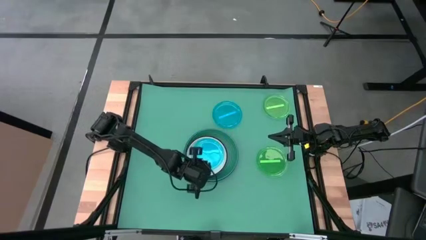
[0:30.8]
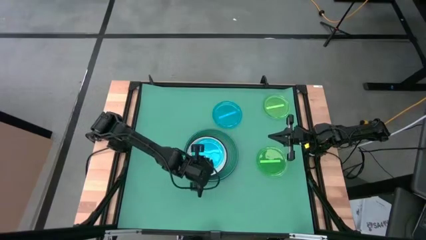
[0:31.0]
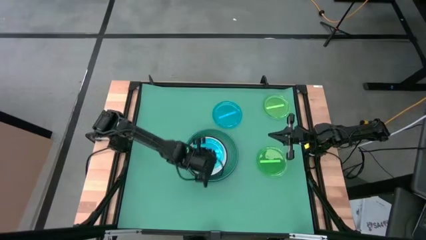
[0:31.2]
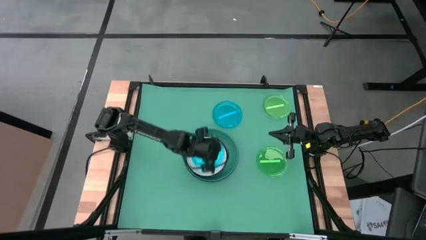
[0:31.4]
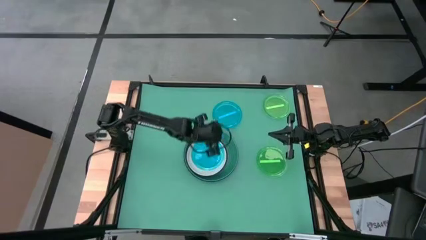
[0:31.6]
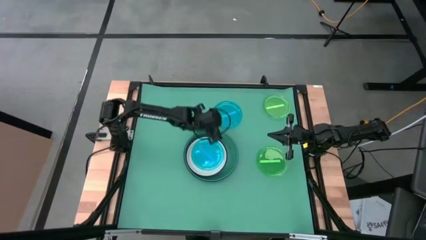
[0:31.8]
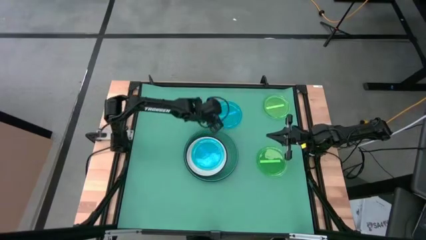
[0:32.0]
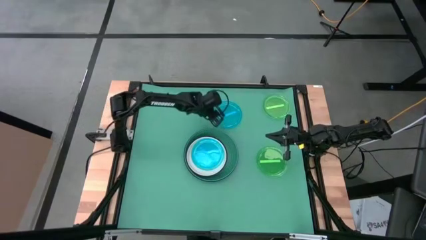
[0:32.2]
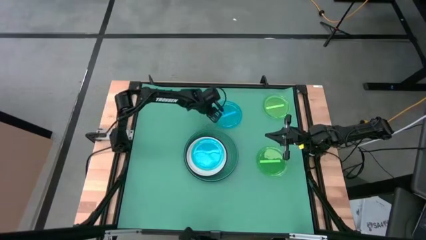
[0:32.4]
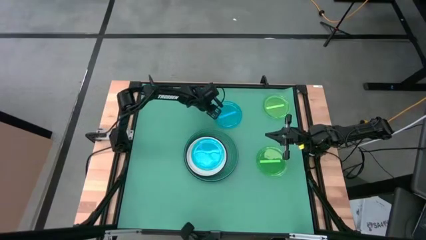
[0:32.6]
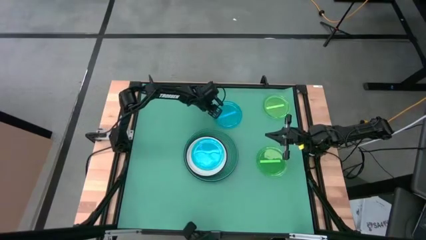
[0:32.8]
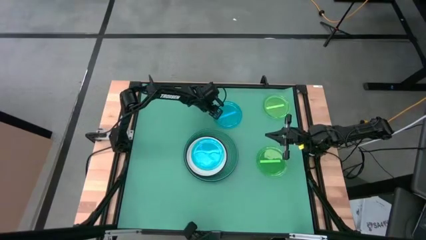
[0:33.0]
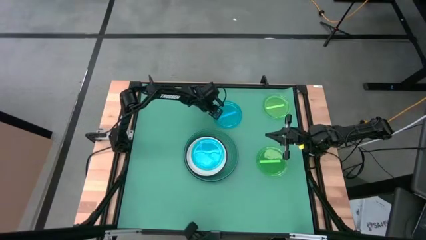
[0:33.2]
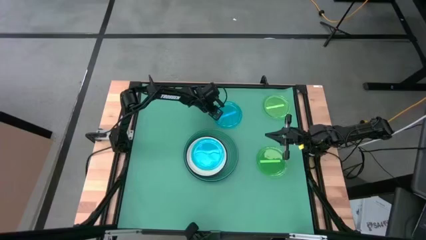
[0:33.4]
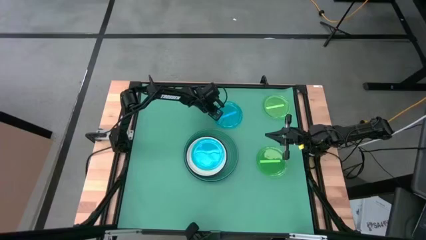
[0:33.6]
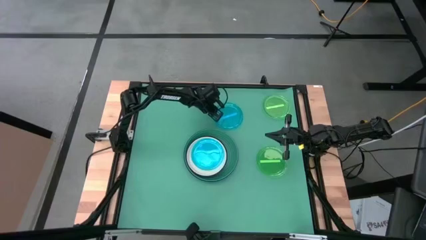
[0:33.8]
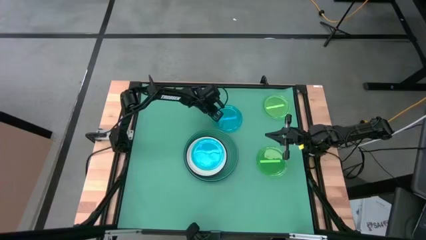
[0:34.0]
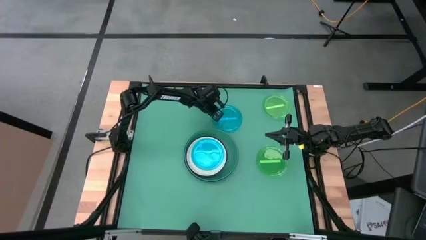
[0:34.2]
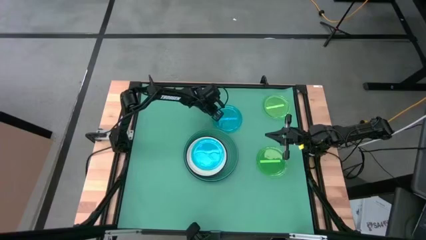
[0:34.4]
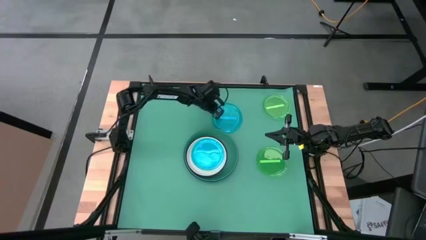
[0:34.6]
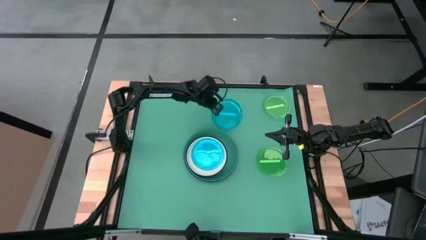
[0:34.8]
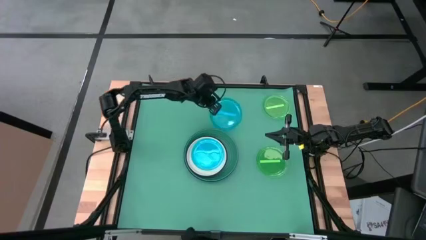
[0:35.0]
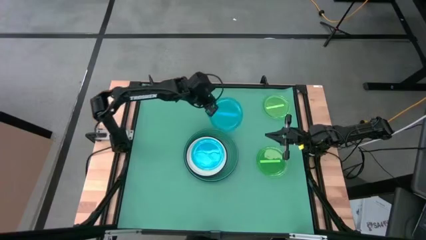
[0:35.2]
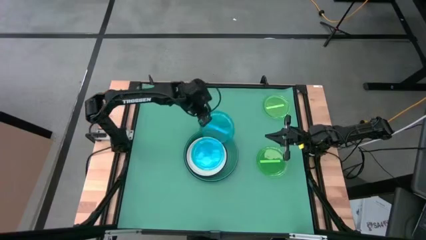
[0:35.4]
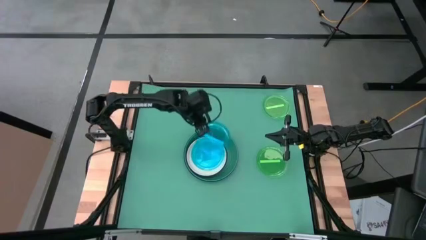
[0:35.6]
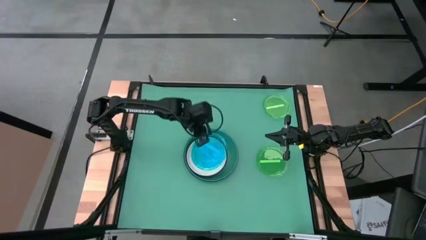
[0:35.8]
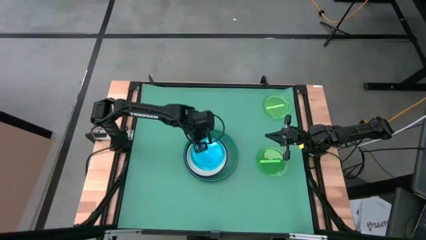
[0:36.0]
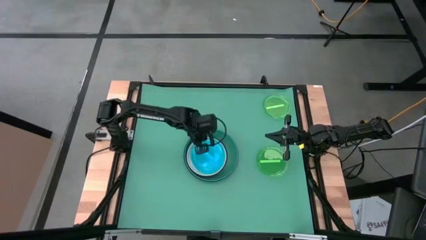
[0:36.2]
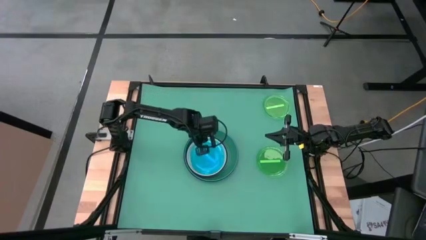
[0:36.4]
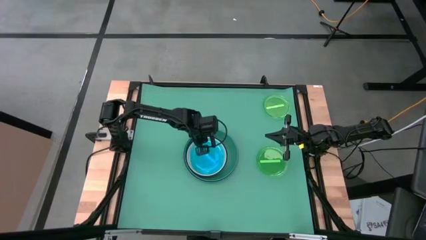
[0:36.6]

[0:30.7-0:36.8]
Task: Stack plastic plates
Stack the plastic blue plate on the plastic blue plate

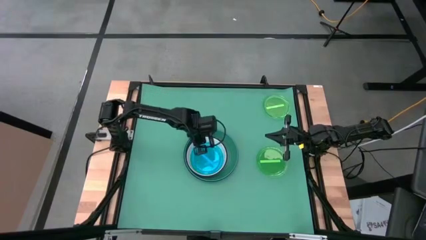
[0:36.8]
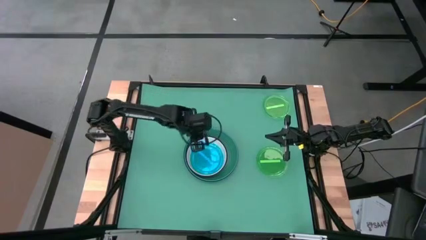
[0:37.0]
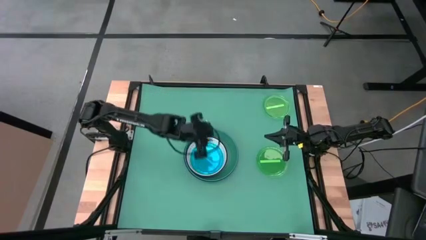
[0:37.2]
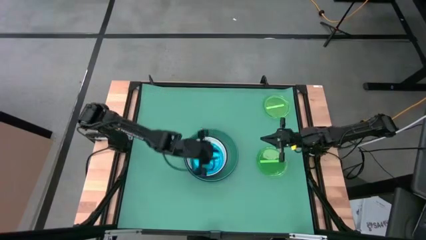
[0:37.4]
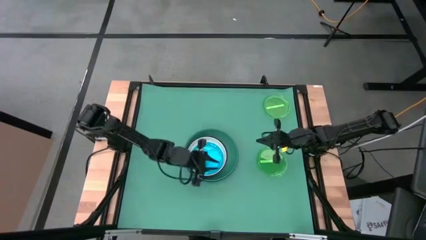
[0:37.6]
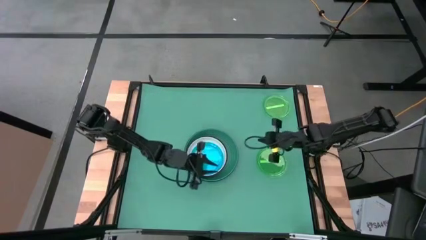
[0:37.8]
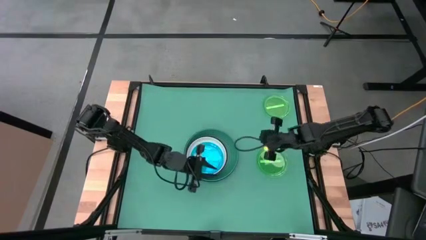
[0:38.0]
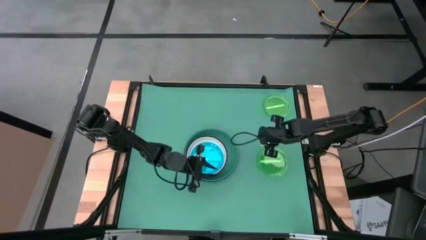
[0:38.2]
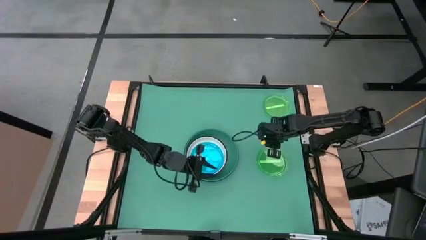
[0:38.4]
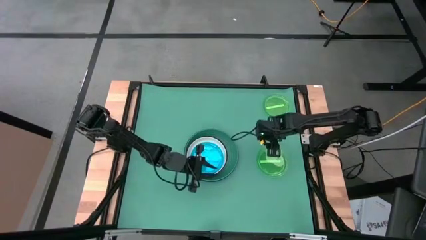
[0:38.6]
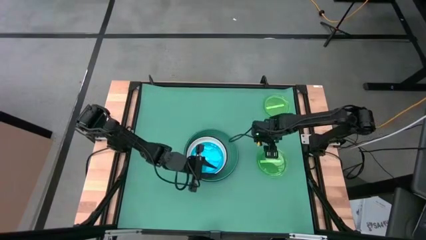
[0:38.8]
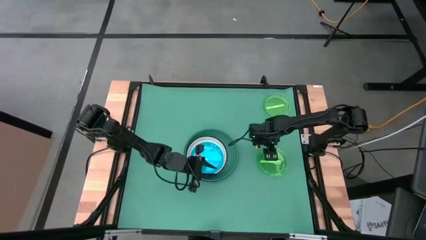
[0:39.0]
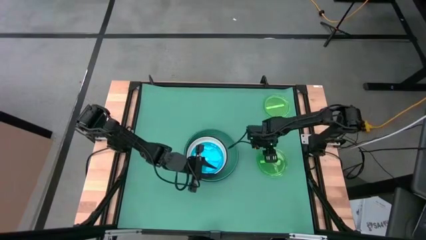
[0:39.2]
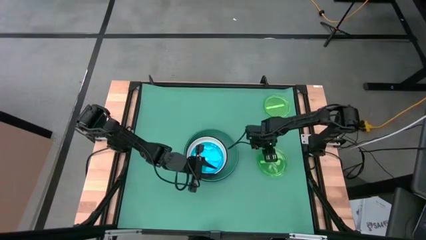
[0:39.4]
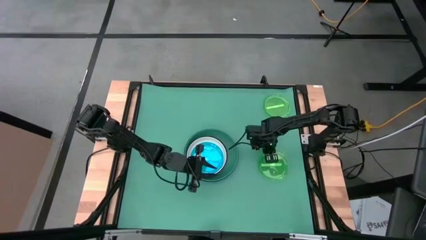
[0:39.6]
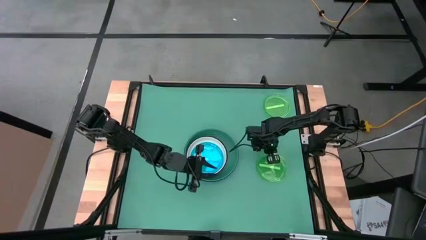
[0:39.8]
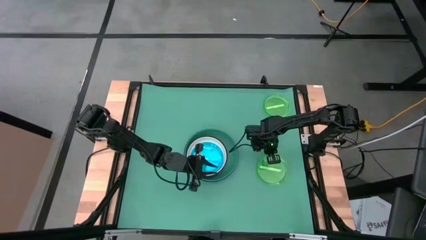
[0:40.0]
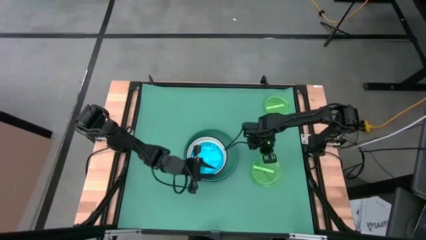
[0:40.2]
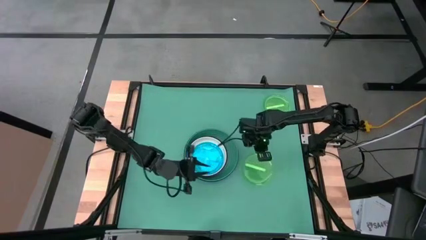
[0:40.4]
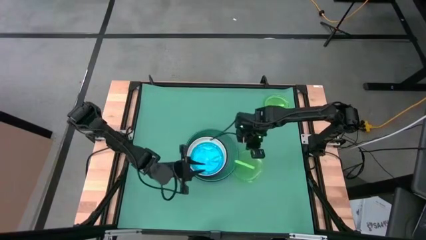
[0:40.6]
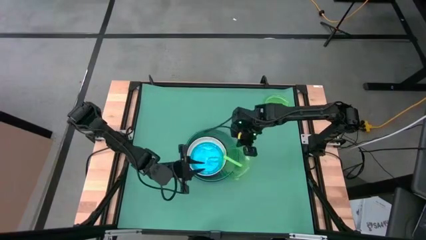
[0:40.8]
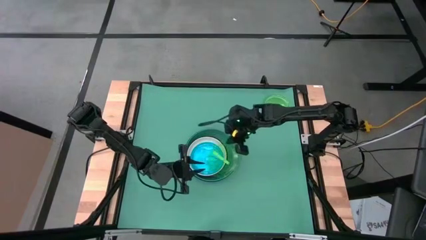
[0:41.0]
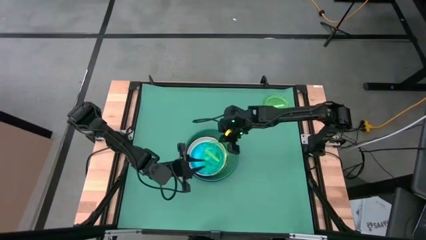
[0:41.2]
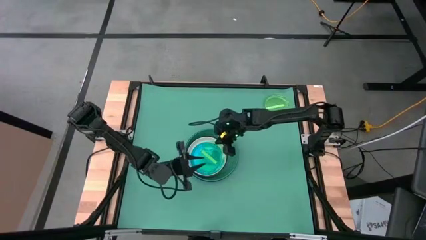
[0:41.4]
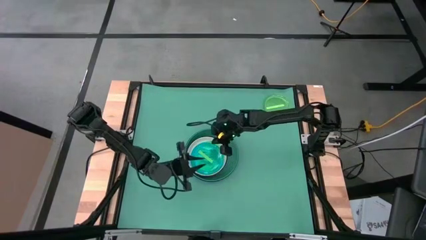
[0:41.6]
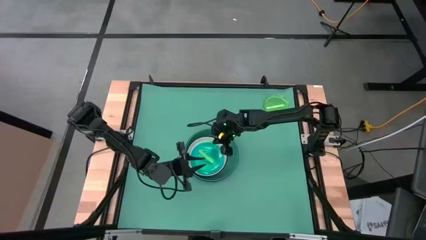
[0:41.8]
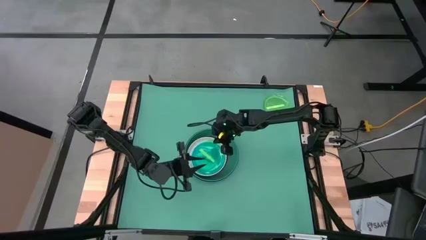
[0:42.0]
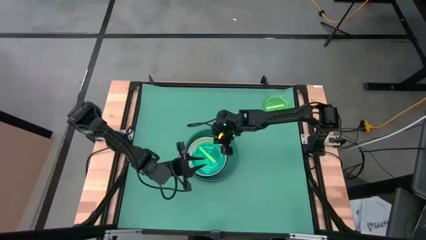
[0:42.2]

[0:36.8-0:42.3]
Stack the bottom plastic green plate on the plastic blue plate

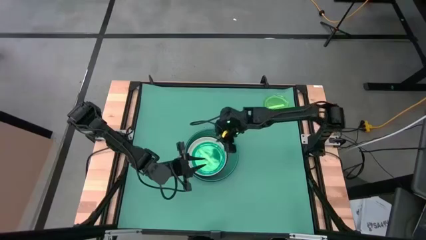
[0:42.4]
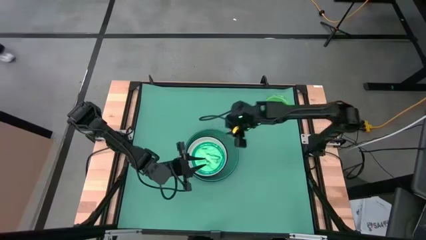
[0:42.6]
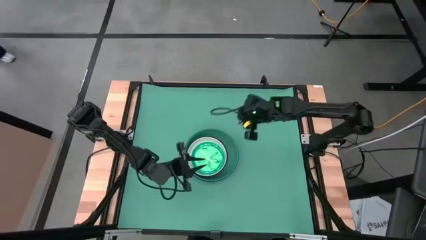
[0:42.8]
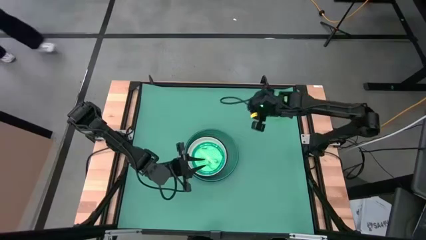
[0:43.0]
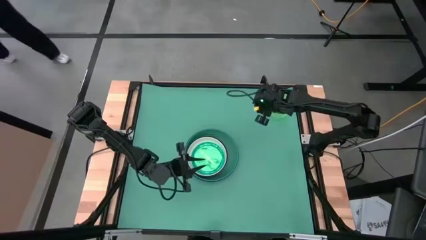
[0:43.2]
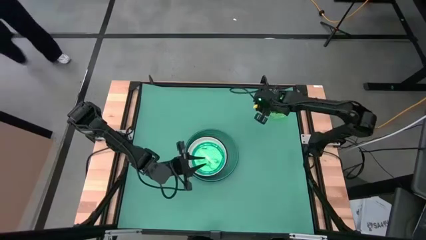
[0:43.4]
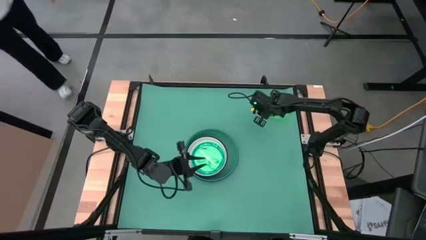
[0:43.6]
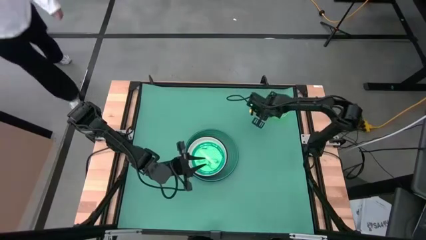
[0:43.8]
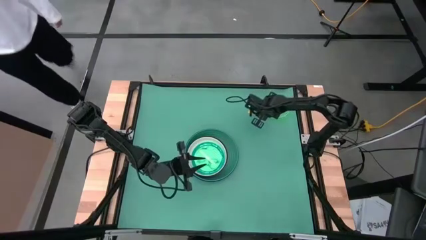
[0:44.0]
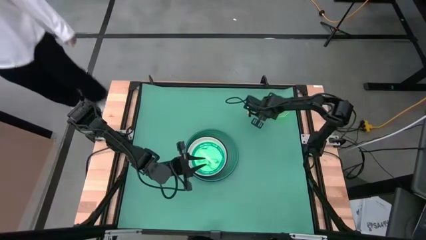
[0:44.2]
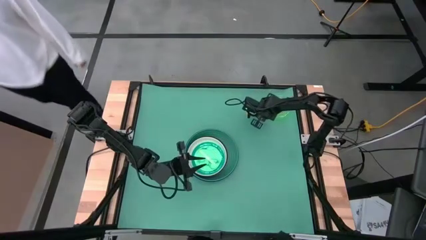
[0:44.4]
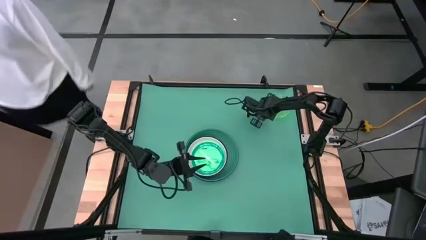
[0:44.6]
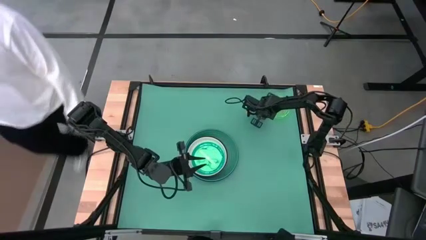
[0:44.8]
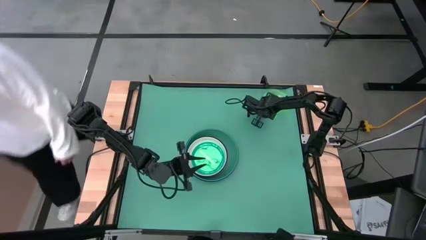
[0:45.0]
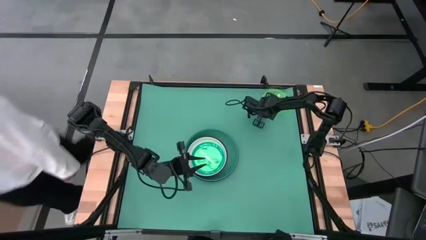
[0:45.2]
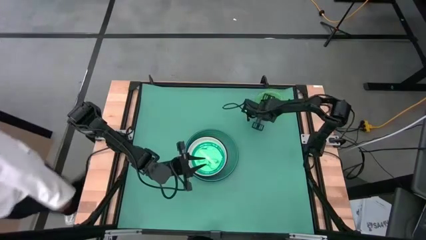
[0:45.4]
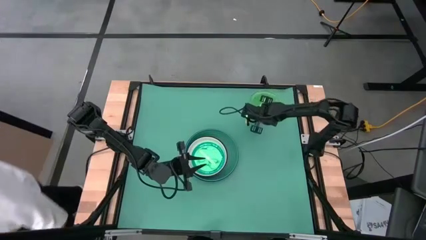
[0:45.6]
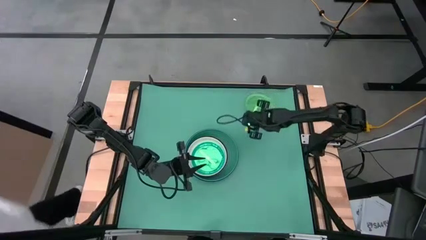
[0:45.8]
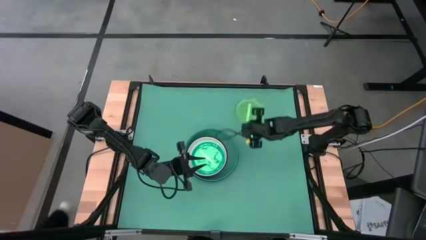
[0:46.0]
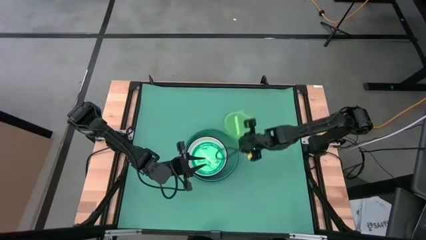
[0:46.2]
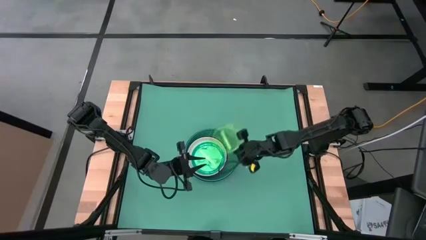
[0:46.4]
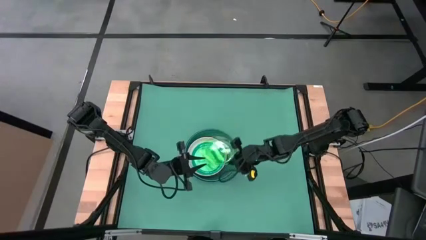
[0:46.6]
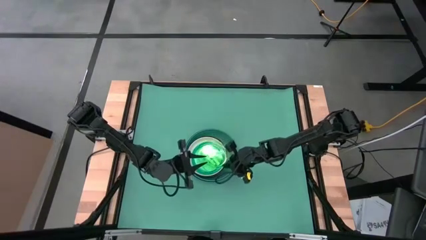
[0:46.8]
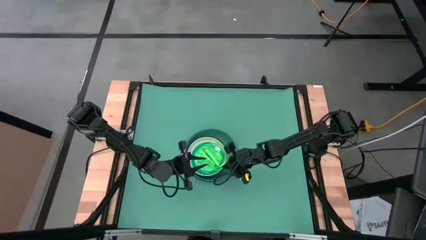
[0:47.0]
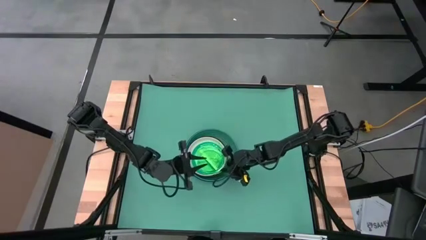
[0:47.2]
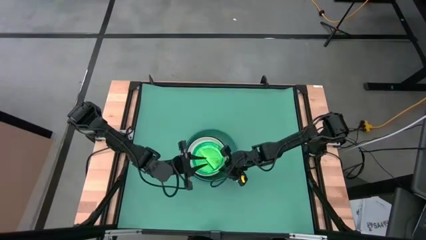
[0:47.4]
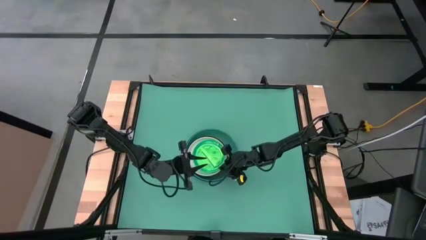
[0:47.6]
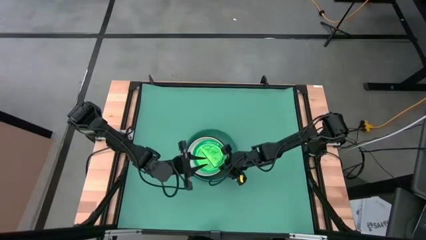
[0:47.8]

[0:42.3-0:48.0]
Stack the plastic green plate on the plastic green plate
